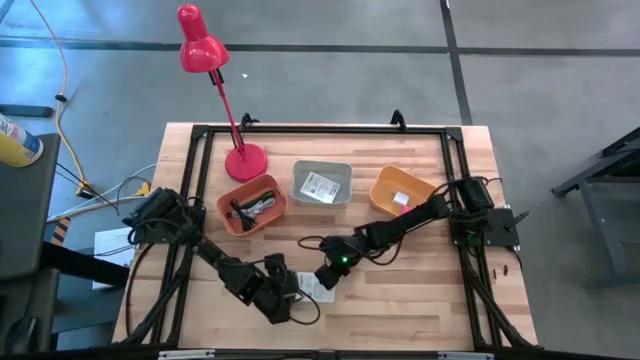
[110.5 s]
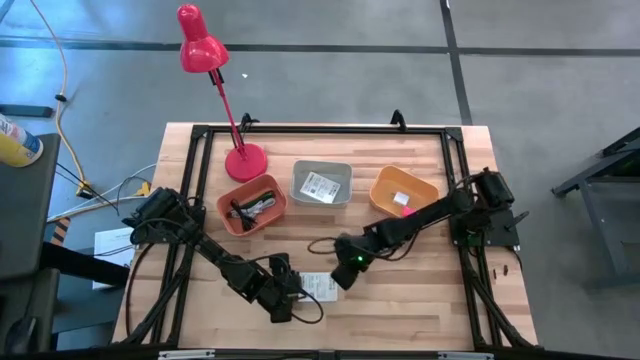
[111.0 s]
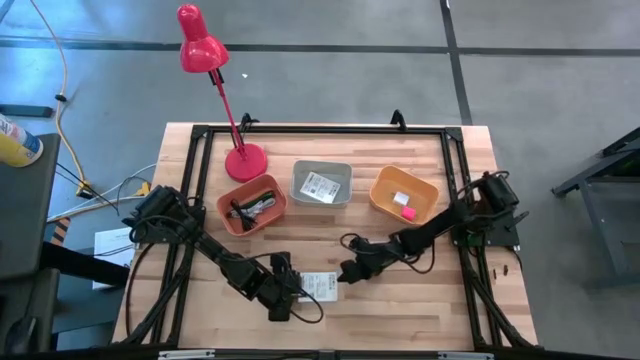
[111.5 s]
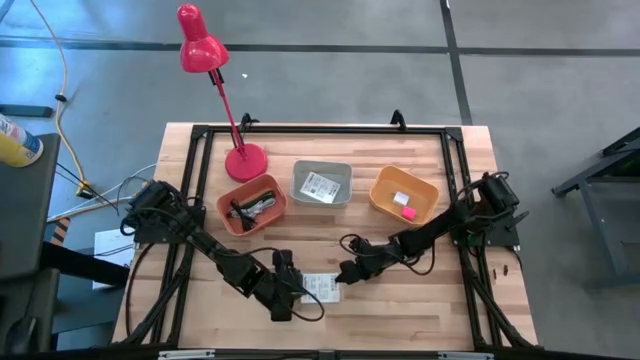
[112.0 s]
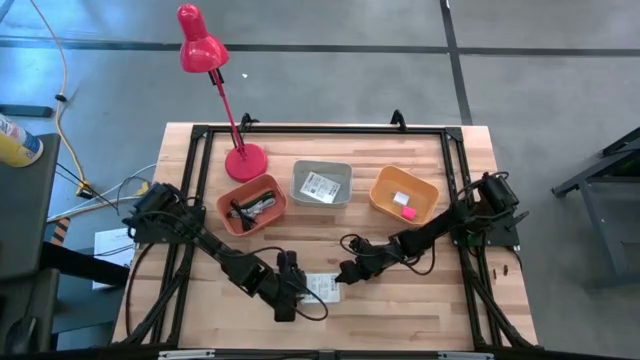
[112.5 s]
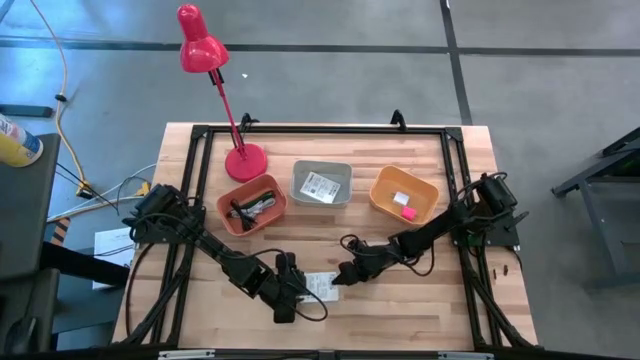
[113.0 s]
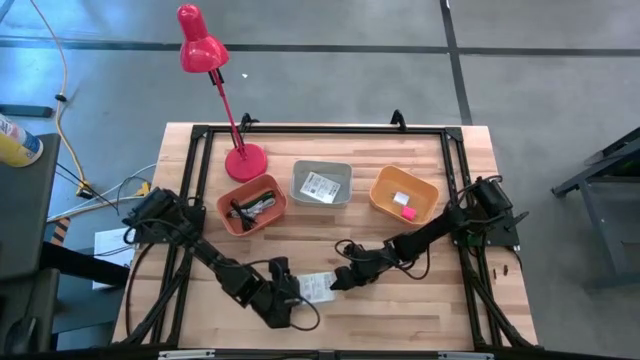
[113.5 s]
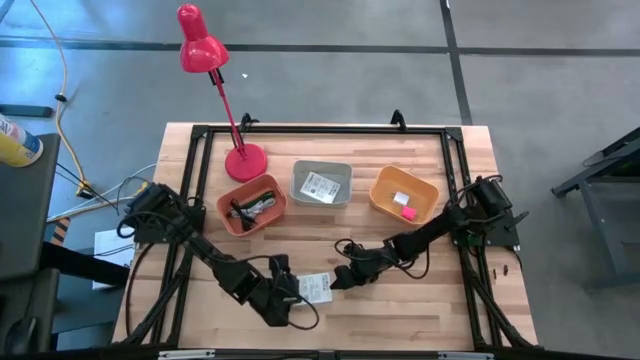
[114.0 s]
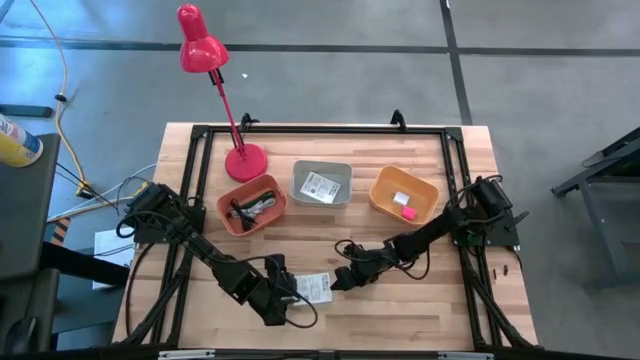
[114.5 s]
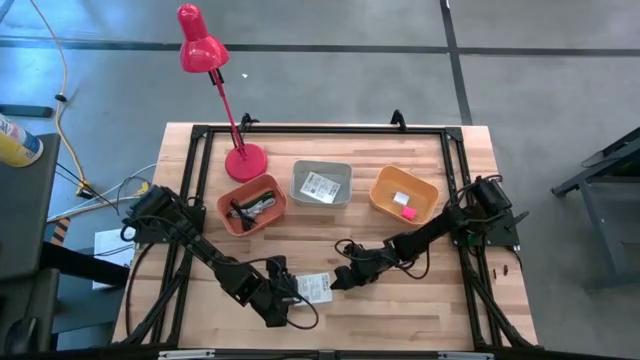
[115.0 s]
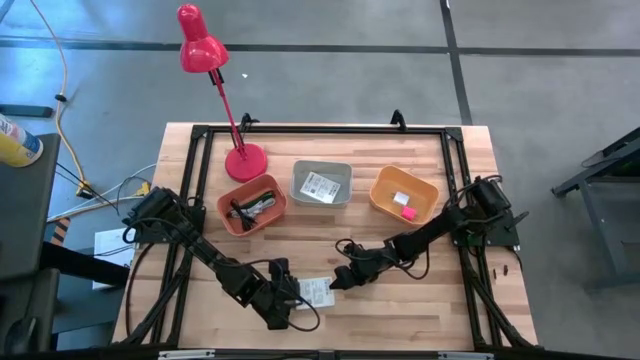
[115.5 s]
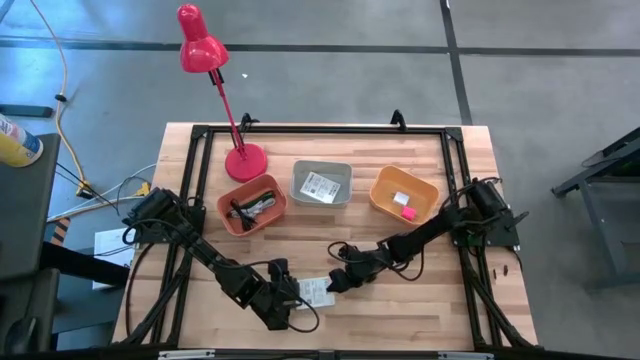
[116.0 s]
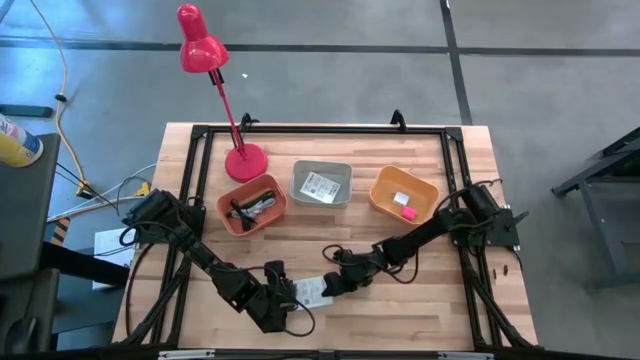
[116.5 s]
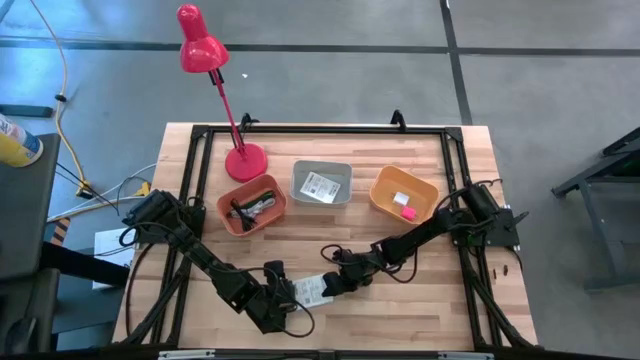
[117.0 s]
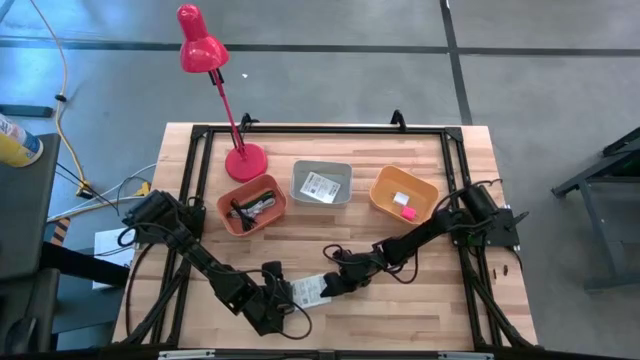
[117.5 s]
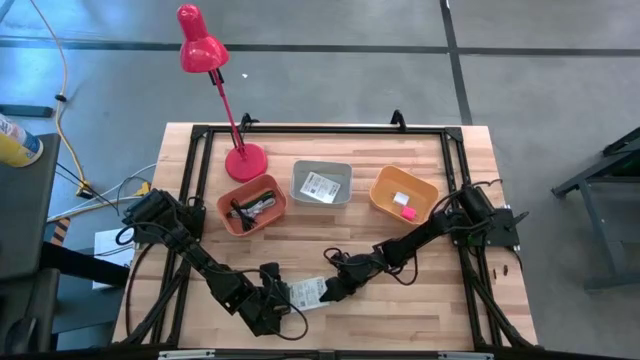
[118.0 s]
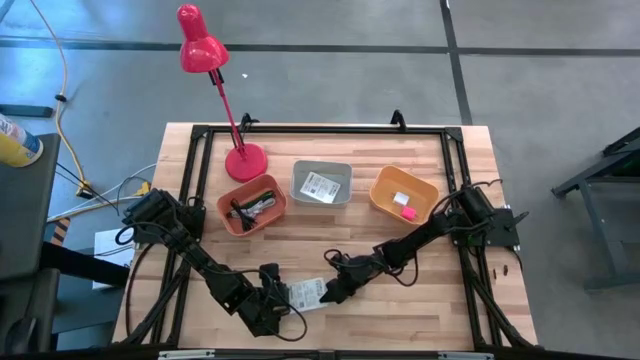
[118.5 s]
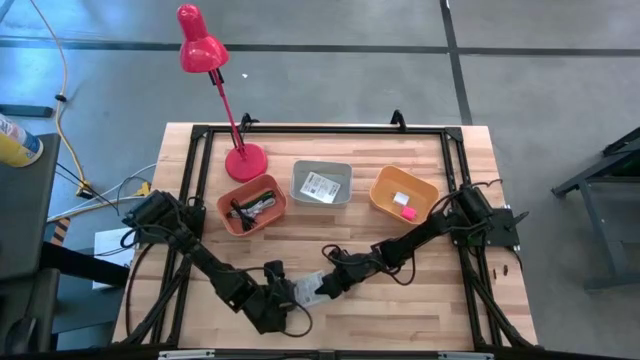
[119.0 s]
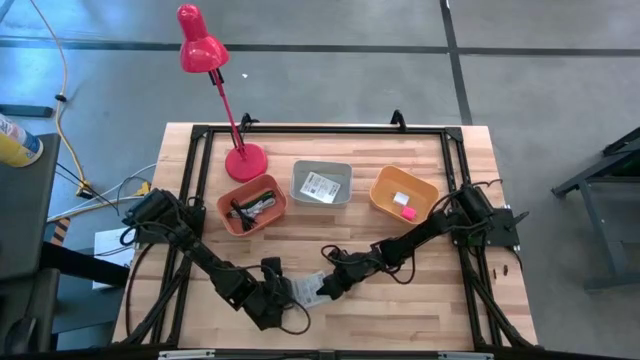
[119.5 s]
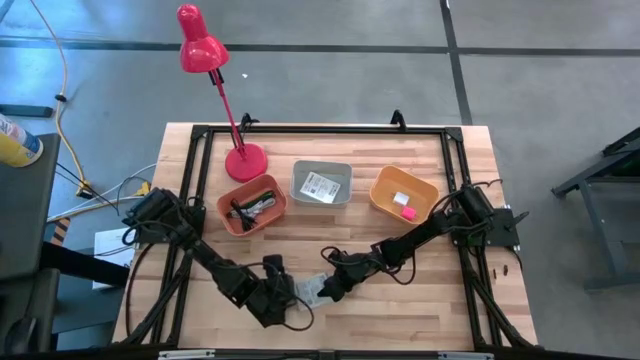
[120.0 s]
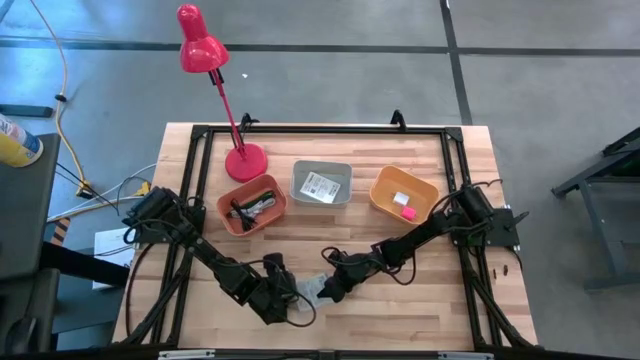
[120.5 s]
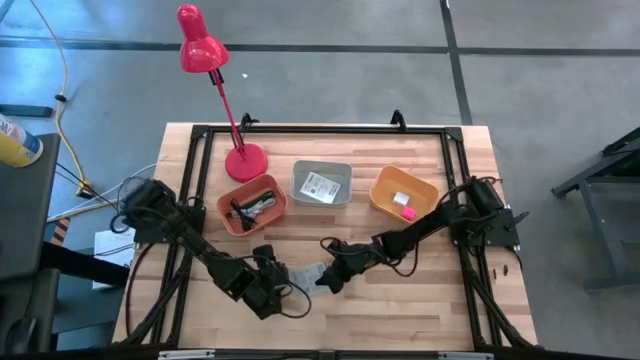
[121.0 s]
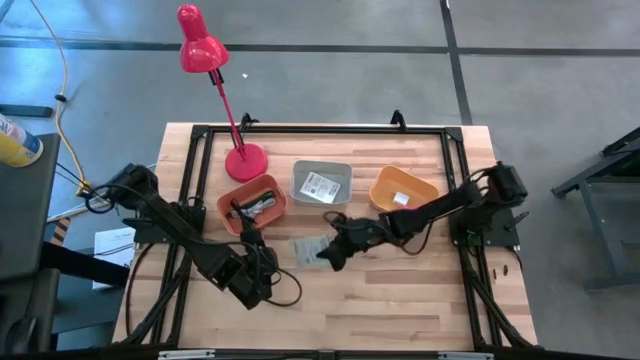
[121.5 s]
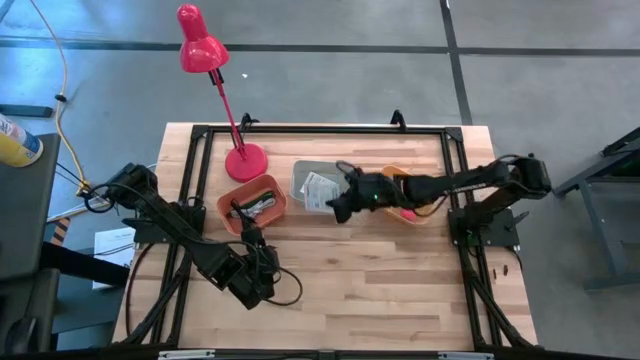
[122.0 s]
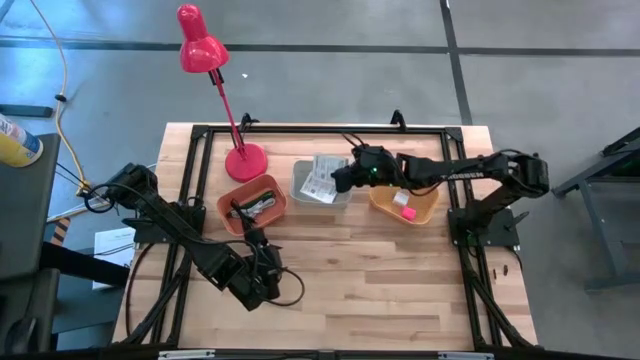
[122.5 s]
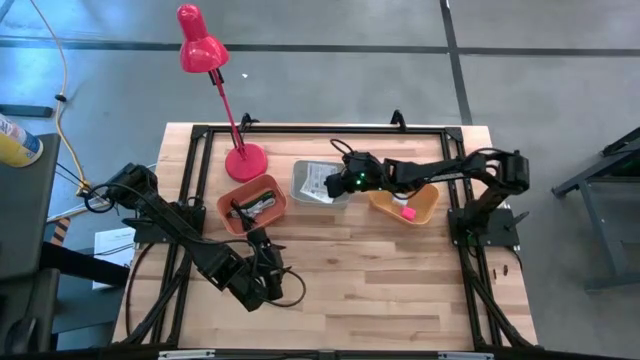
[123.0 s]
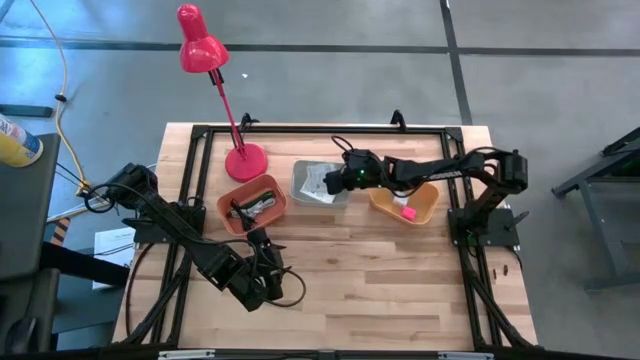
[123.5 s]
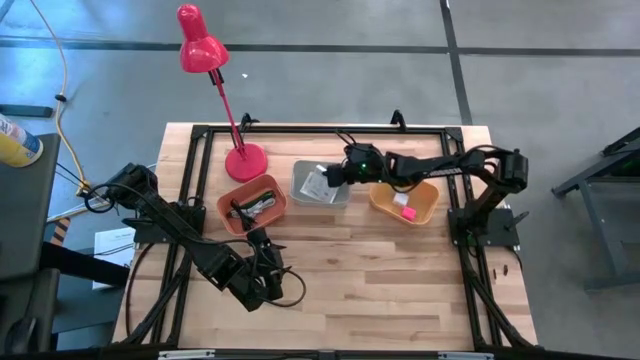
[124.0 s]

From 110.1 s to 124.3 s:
Task: Pick and place items into bin
Put the white card reader box into the gray bin

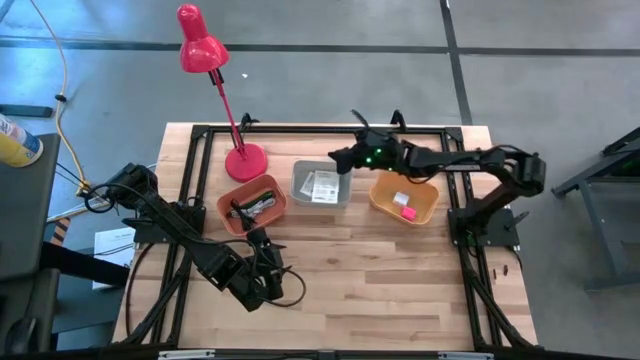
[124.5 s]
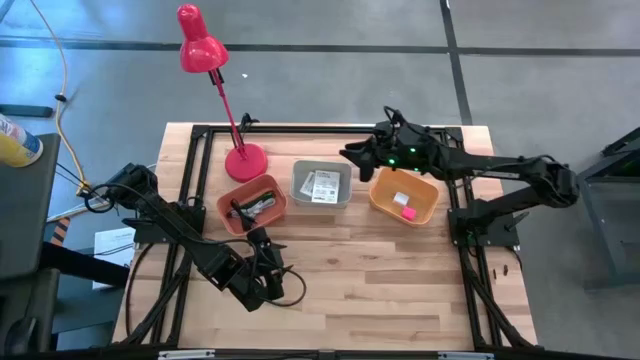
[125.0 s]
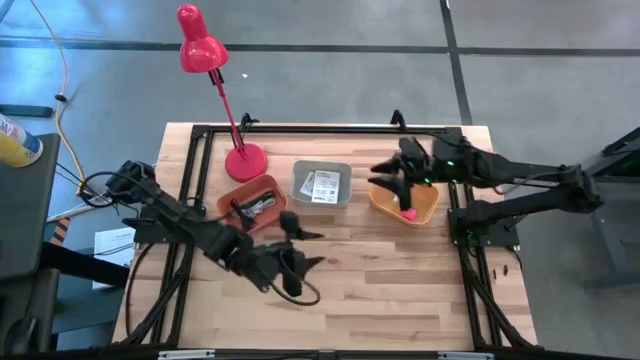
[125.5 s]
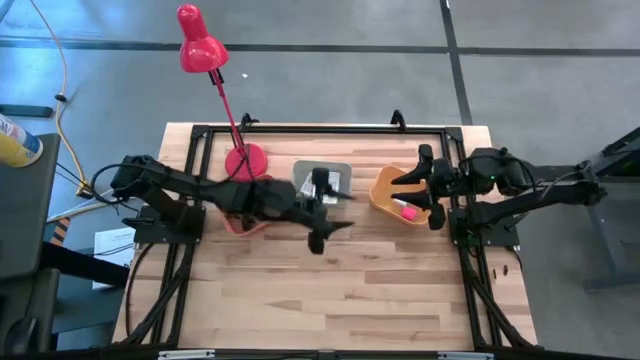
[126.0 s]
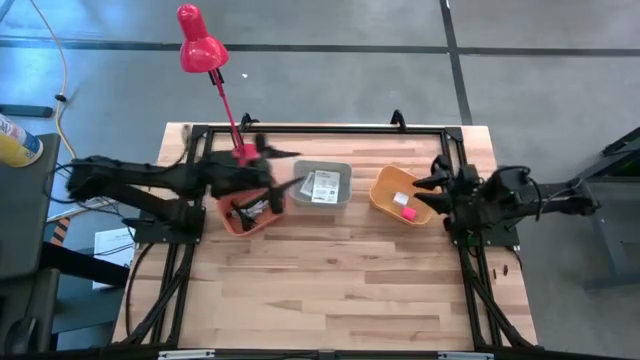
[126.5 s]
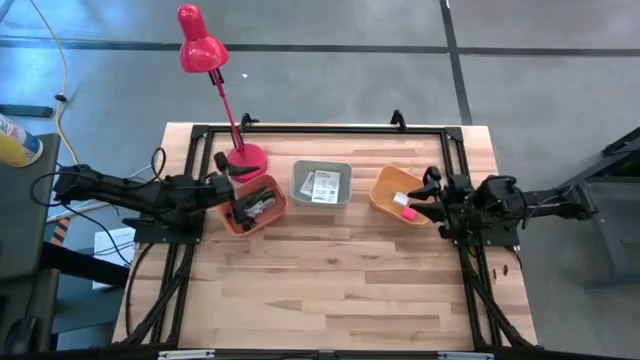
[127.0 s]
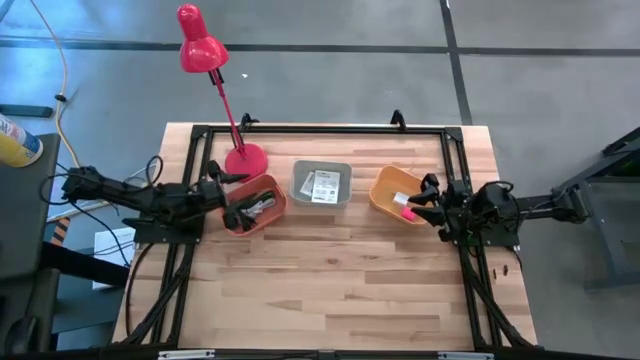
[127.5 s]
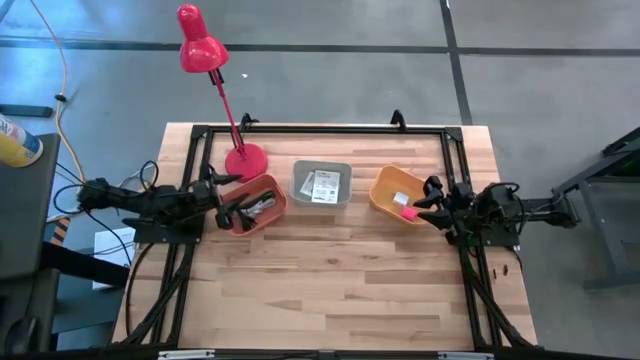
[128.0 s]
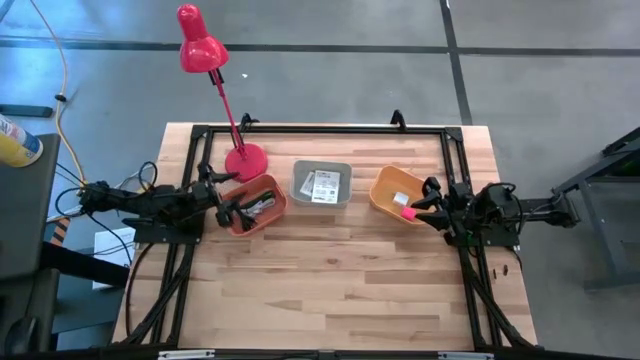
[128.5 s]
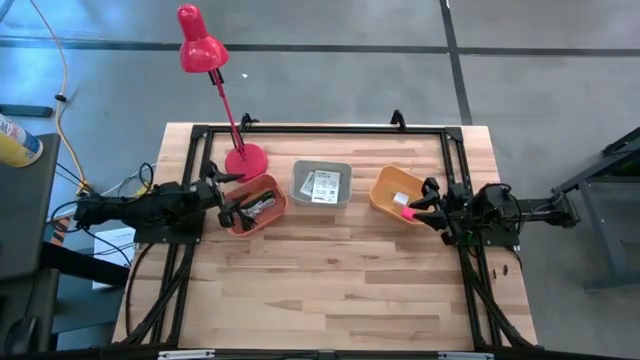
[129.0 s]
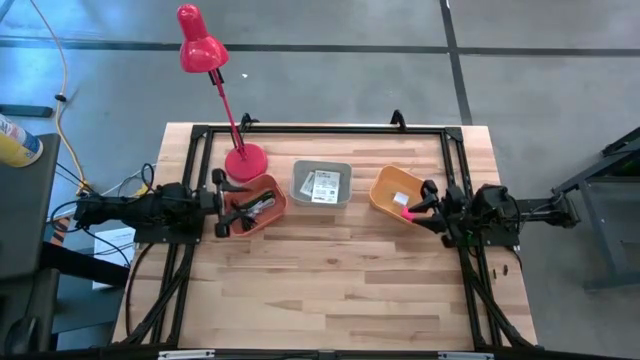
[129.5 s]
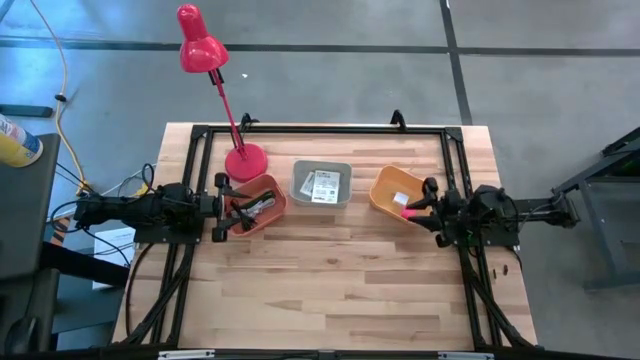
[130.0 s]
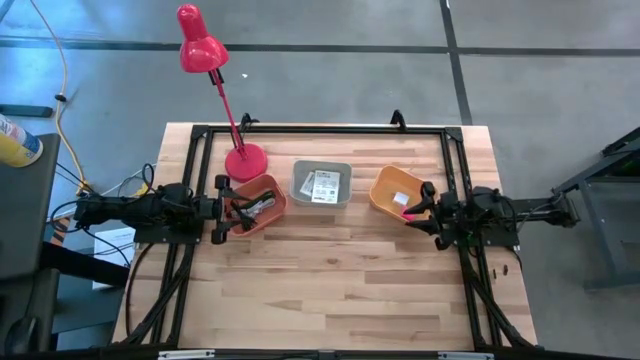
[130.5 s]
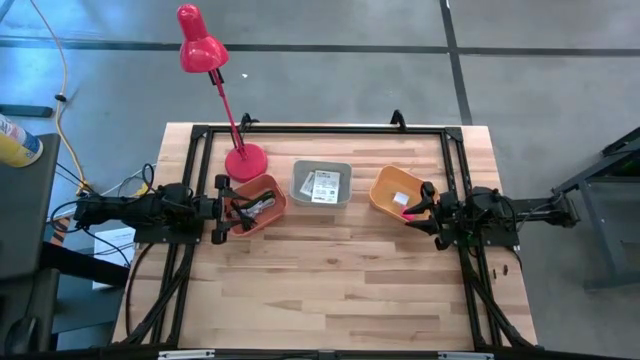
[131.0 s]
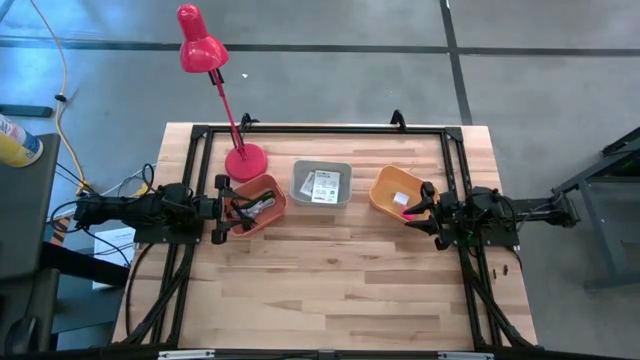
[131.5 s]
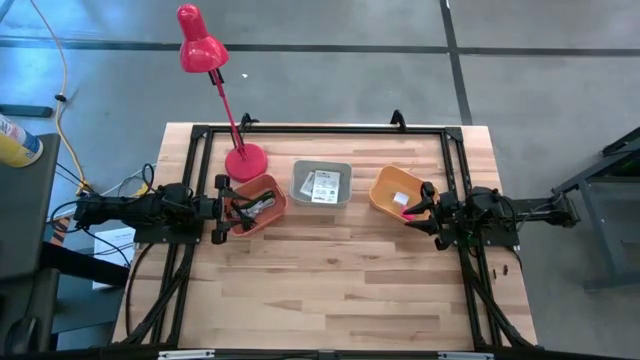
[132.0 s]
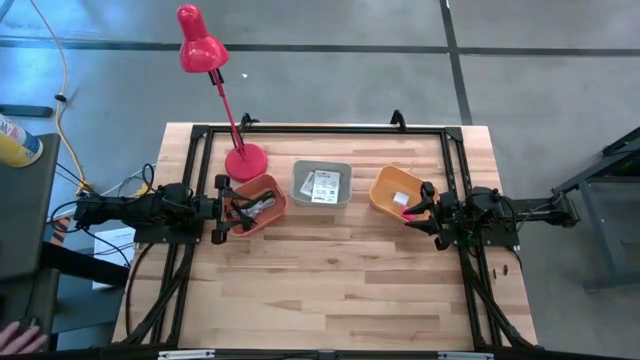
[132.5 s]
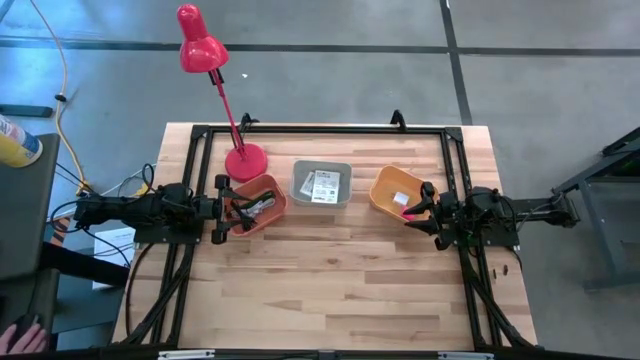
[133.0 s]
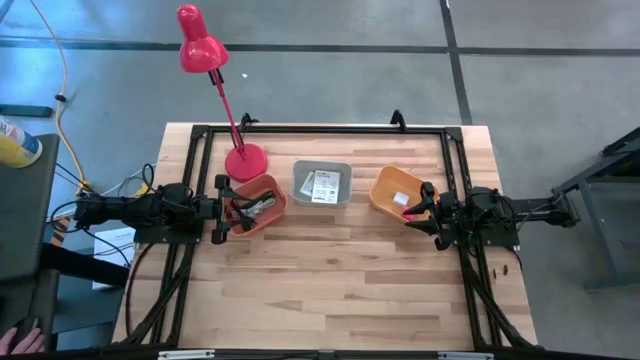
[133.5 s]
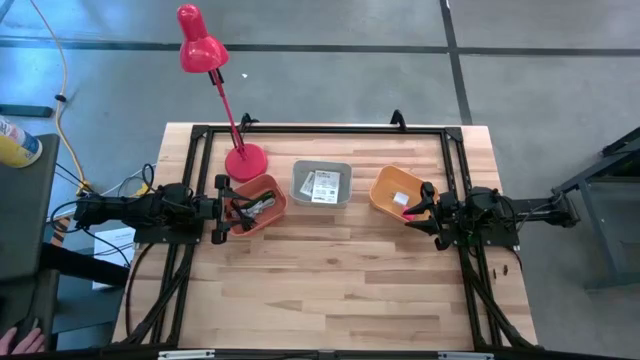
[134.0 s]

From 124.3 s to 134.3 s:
Return to Home Position
